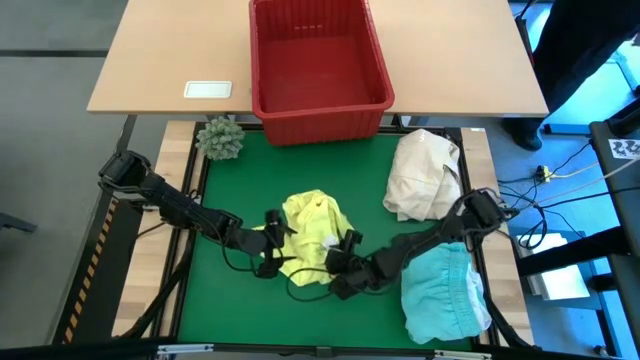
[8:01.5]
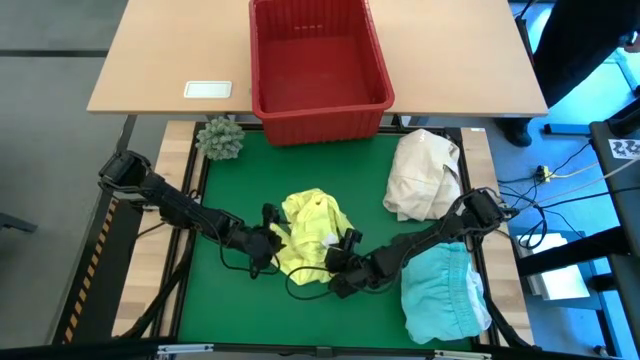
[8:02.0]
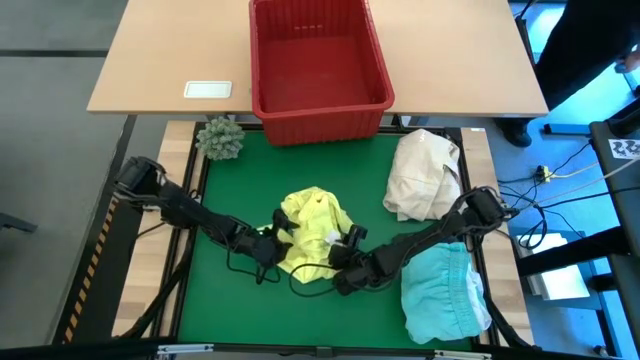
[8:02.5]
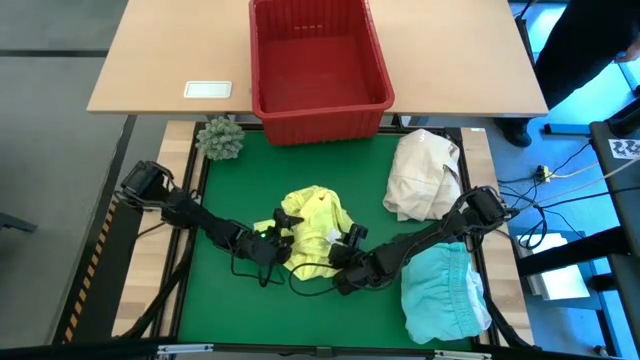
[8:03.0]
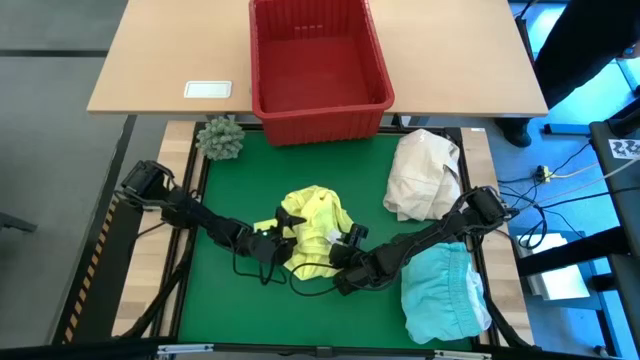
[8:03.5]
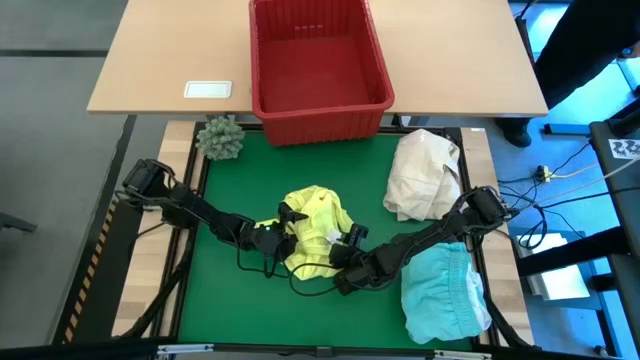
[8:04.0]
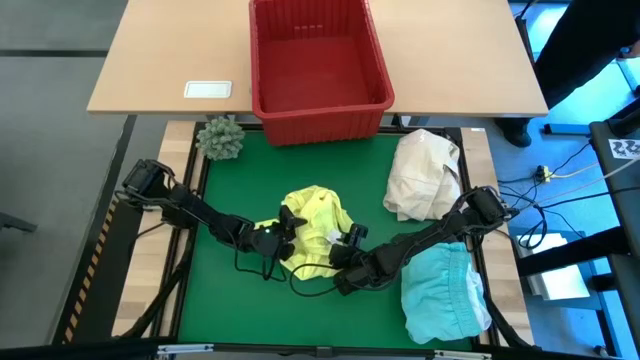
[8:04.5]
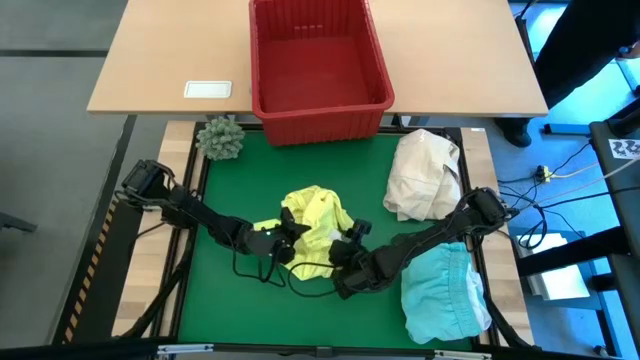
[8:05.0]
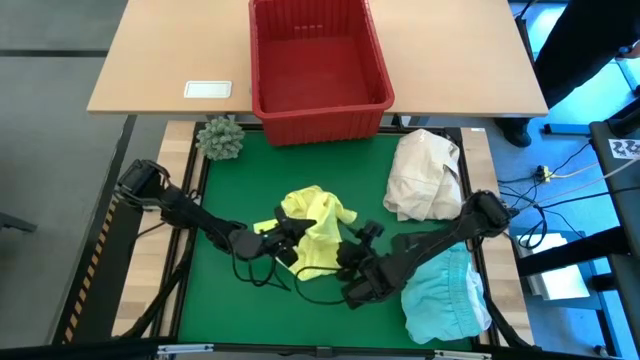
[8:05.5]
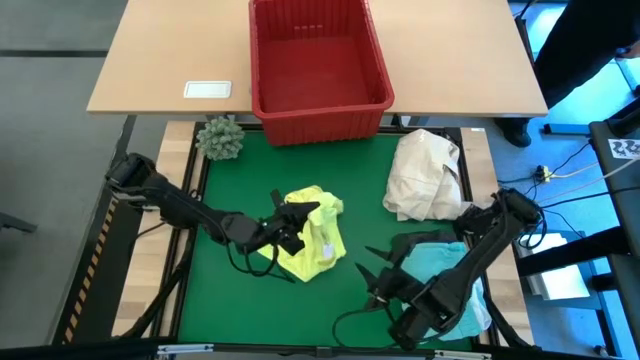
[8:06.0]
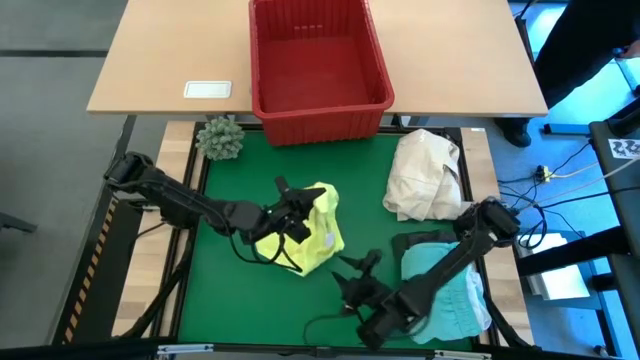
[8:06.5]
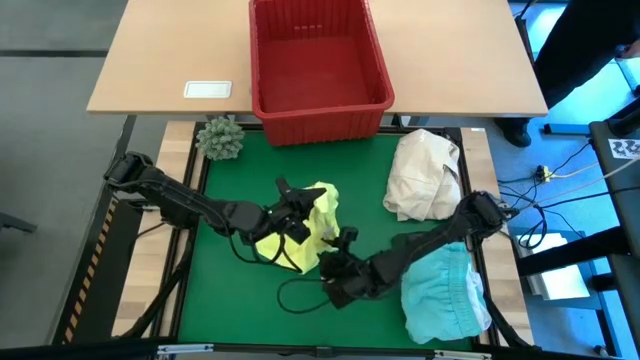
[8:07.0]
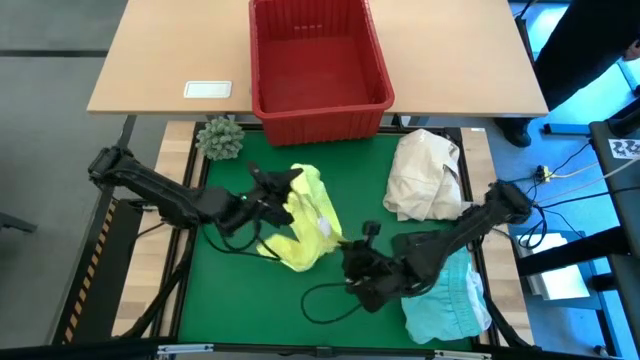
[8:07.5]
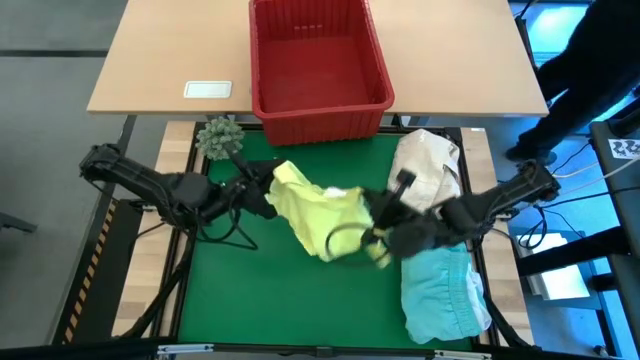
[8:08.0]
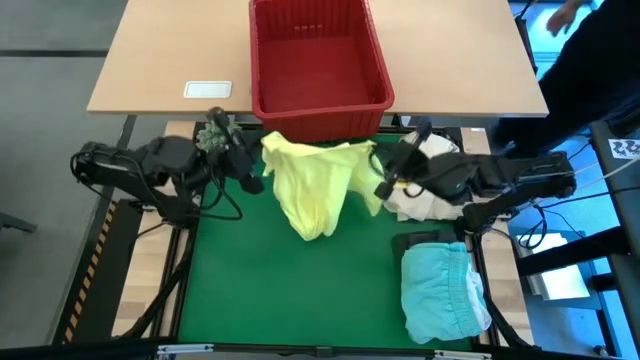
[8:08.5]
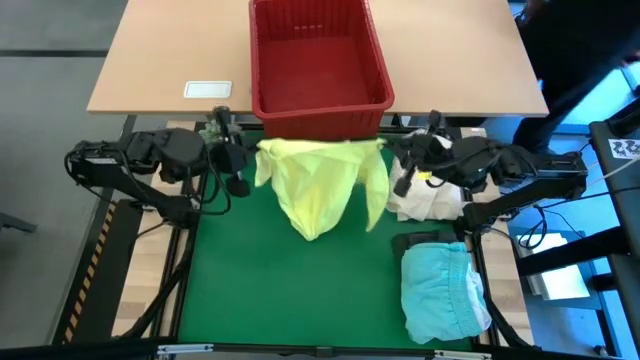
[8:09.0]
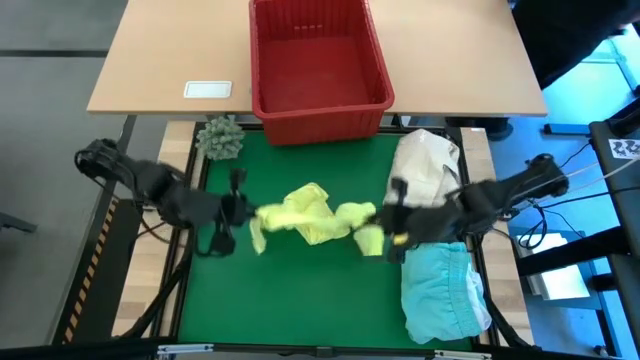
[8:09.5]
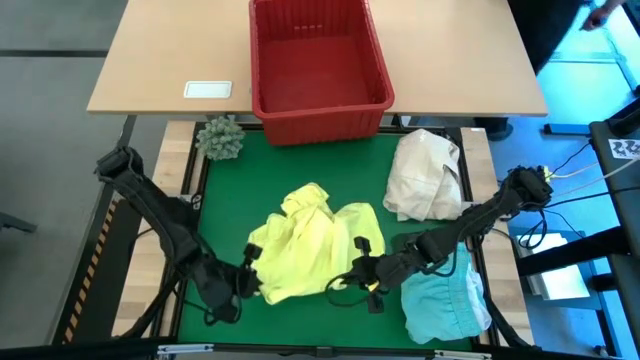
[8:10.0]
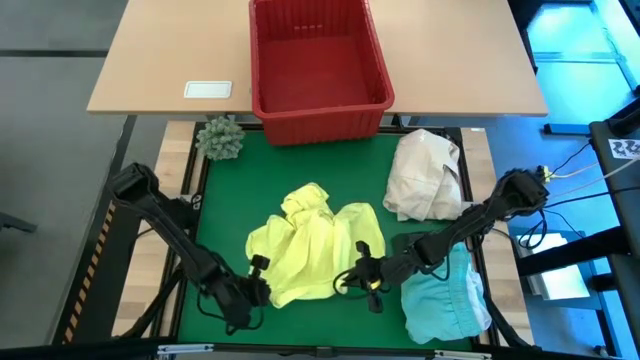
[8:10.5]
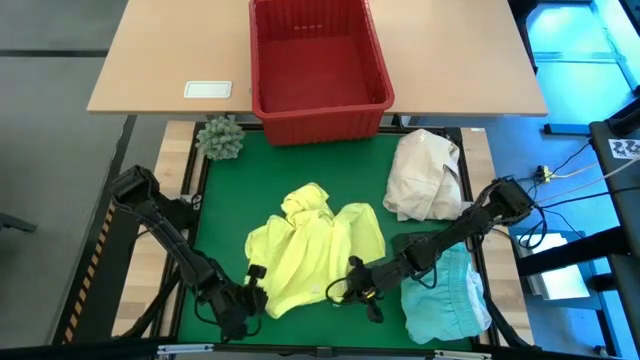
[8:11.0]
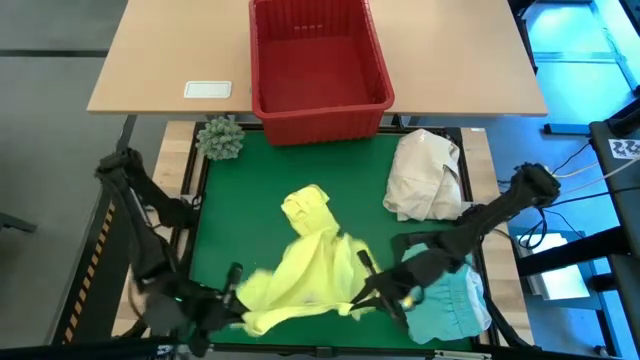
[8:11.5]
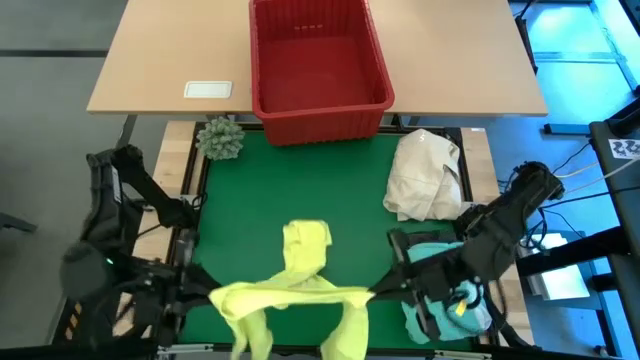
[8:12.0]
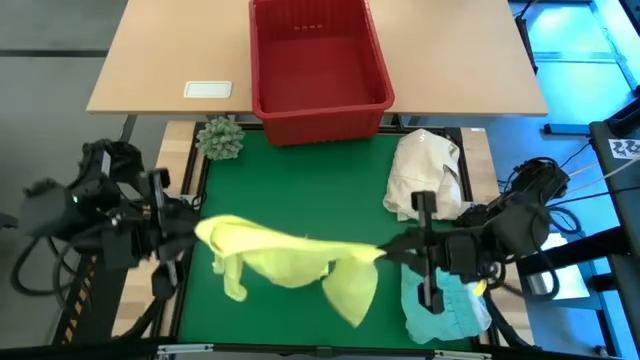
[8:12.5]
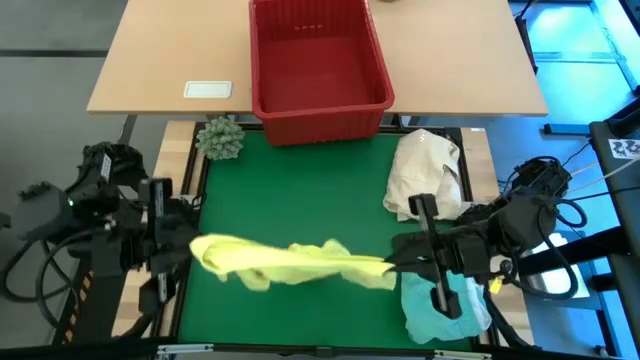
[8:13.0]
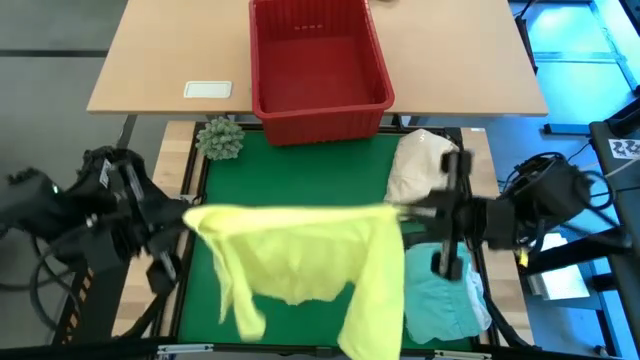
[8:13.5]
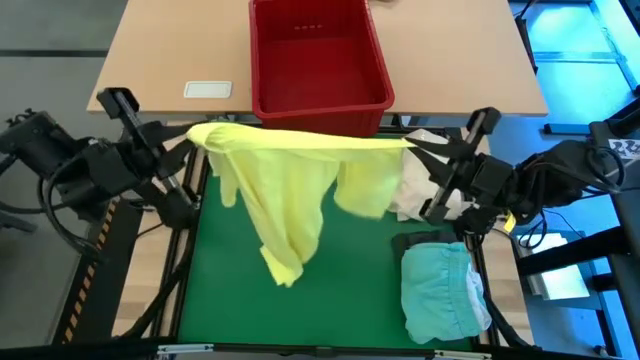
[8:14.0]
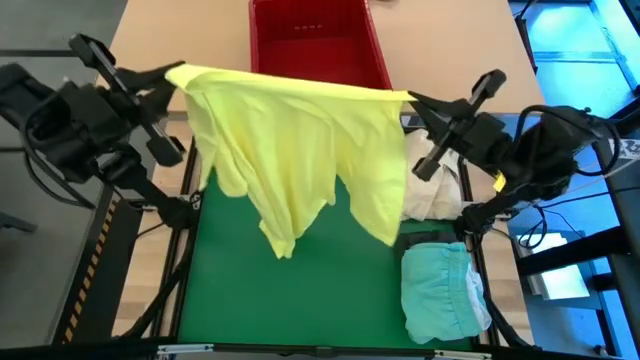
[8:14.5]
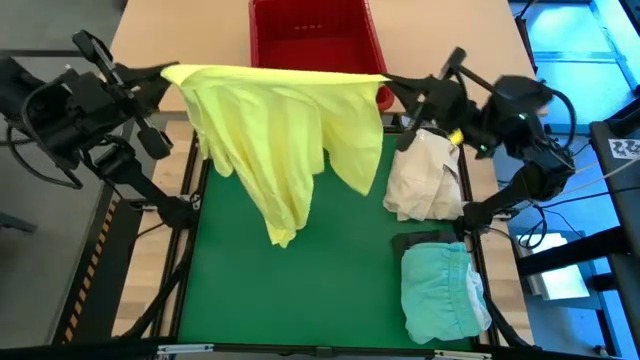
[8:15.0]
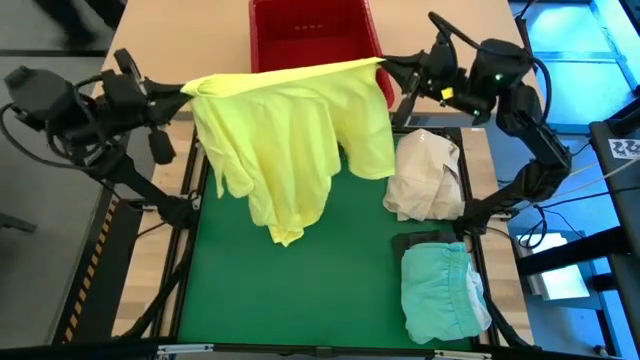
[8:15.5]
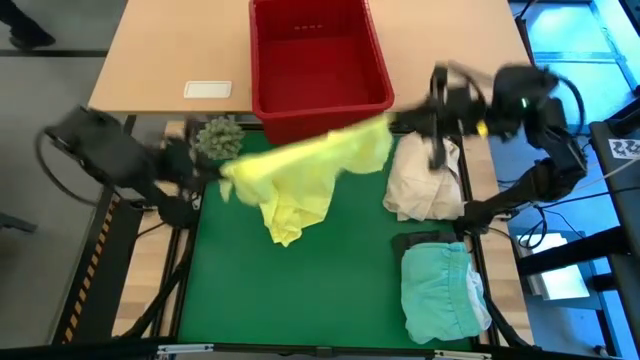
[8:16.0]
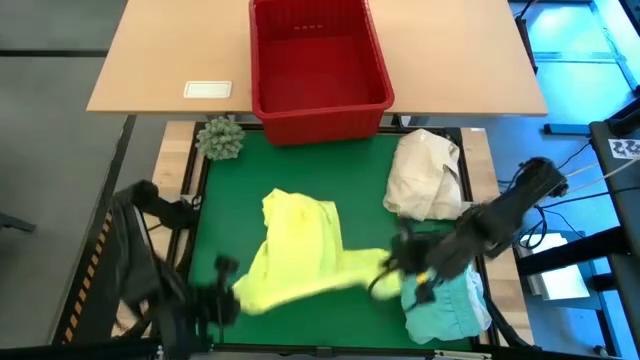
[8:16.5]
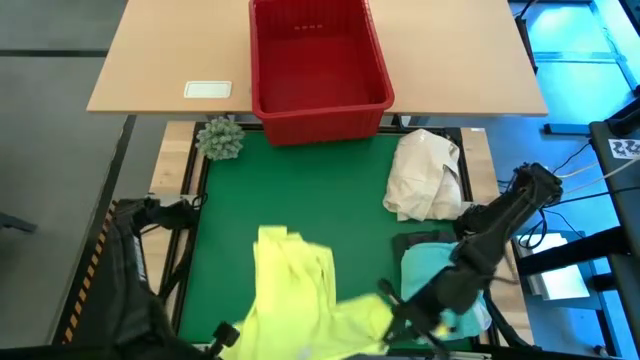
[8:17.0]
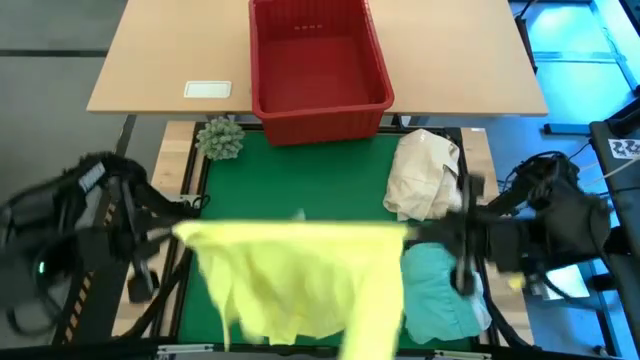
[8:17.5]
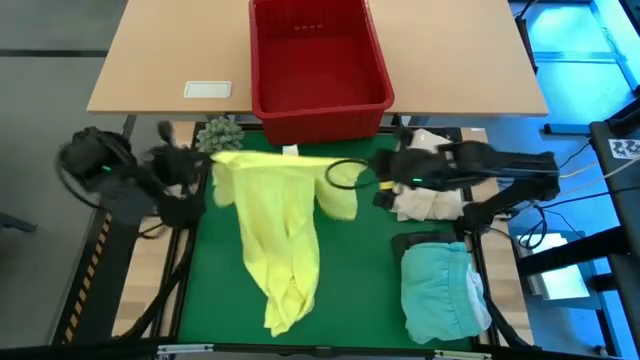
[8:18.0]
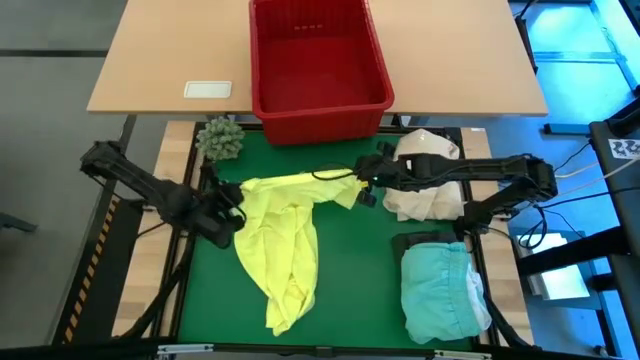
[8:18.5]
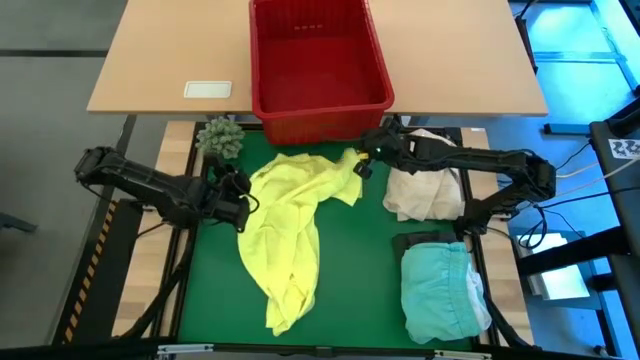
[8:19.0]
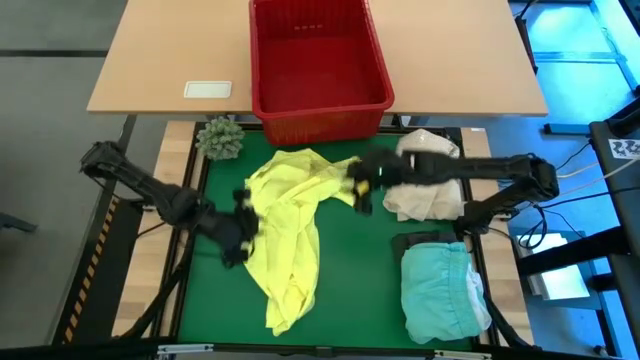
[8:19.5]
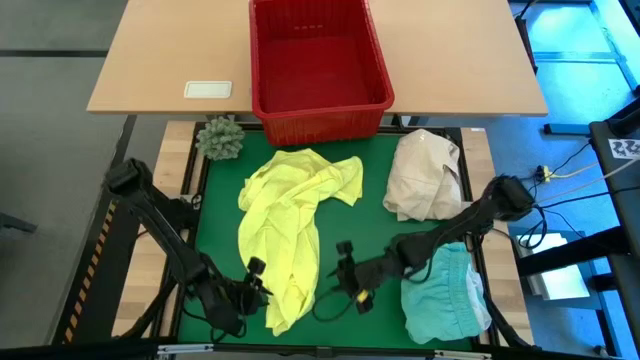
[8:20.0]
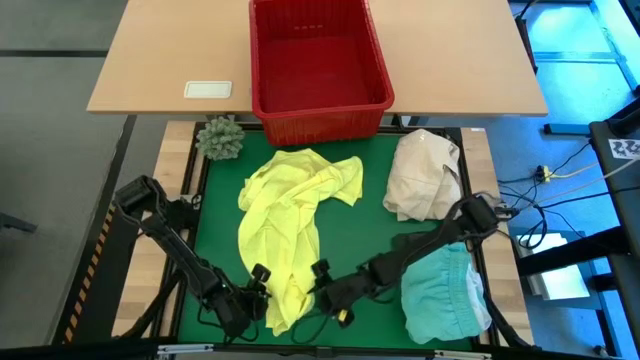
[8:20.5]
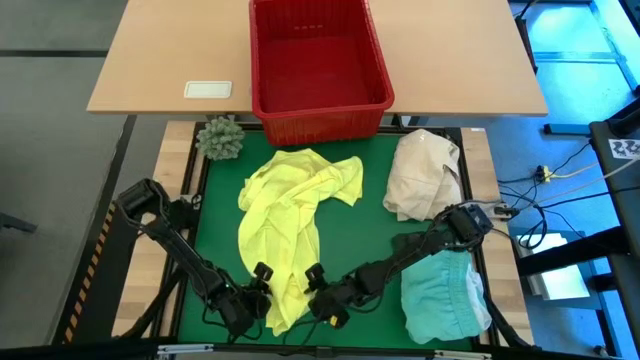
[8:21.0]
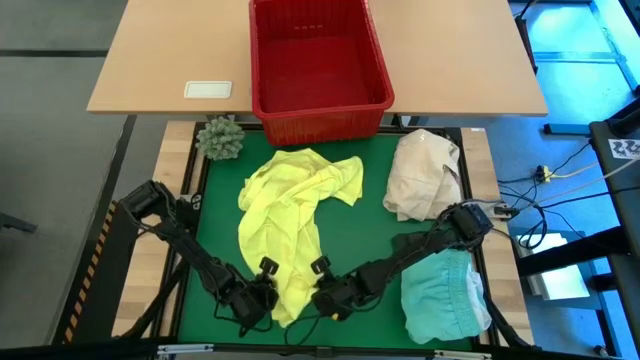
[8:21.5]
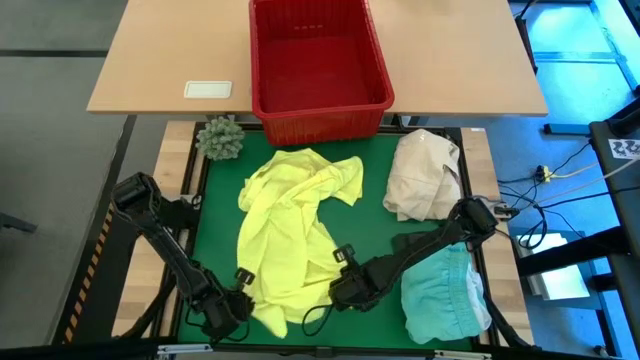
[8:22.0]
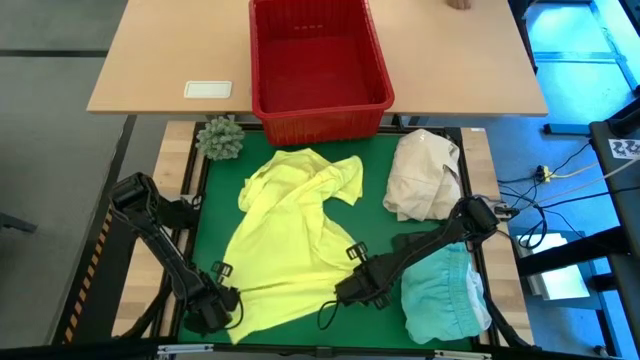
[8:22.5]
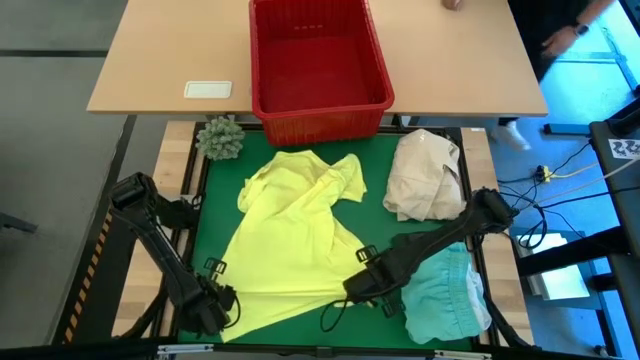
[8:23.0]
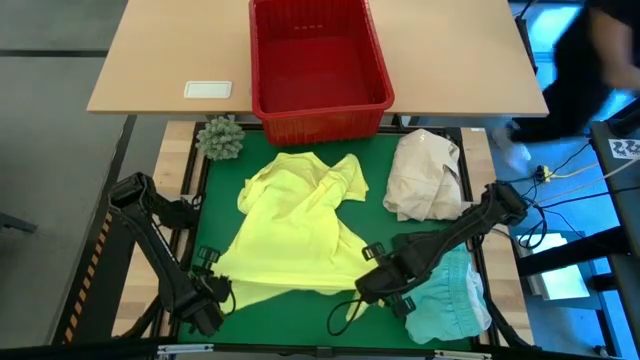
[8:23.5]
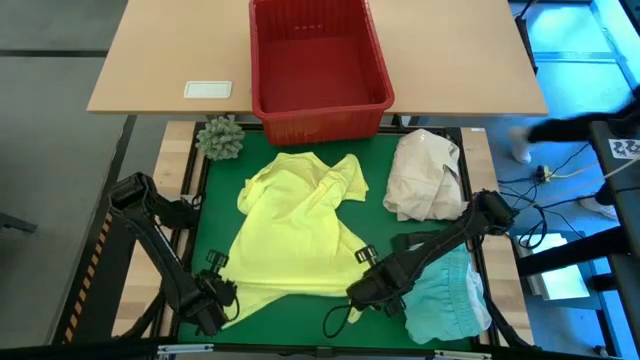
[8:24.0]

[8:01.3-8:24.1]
Task: Fold Laundry from Bin
Fold the yellow shirt
